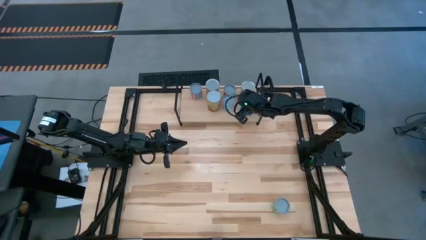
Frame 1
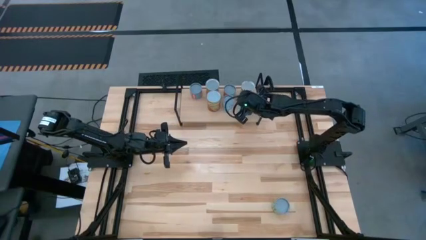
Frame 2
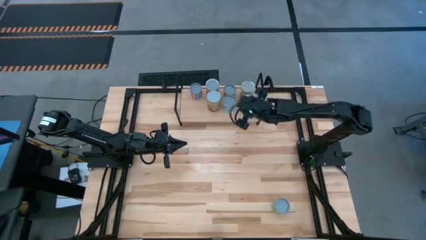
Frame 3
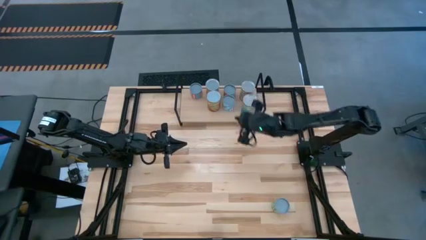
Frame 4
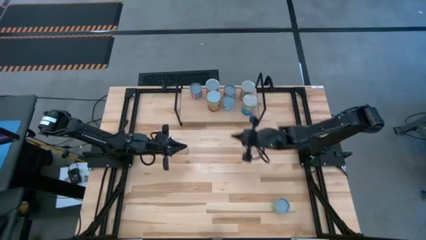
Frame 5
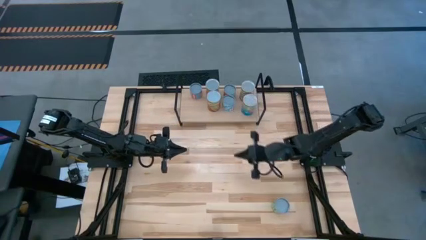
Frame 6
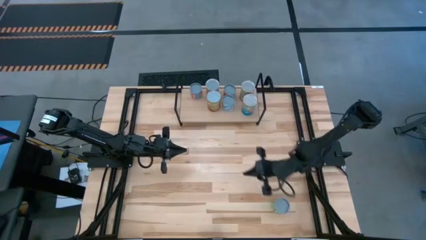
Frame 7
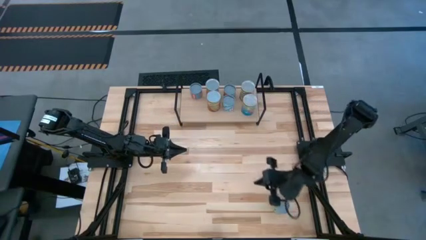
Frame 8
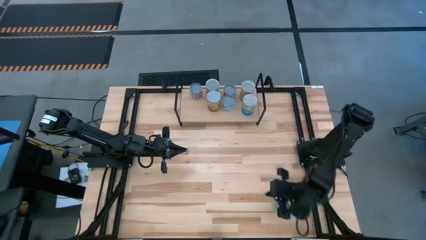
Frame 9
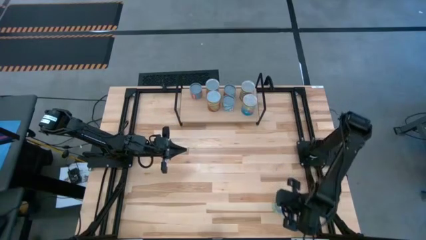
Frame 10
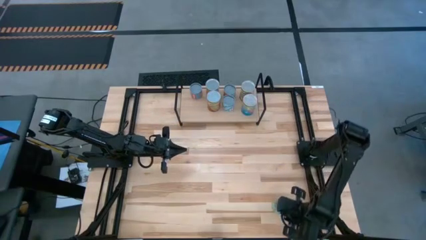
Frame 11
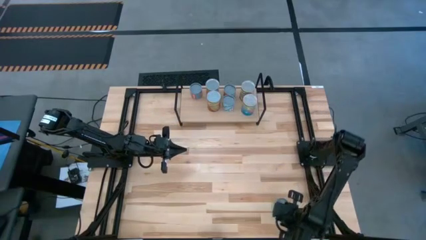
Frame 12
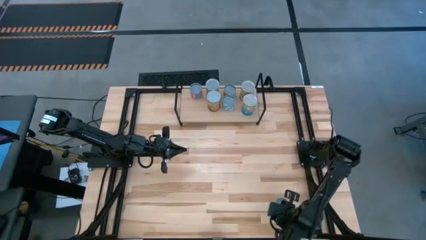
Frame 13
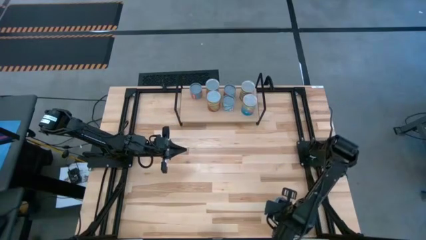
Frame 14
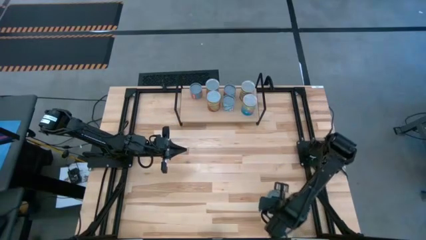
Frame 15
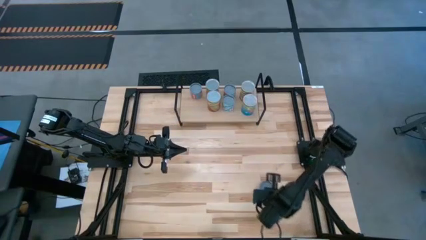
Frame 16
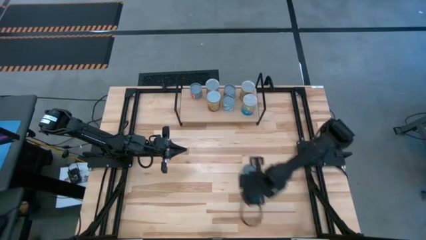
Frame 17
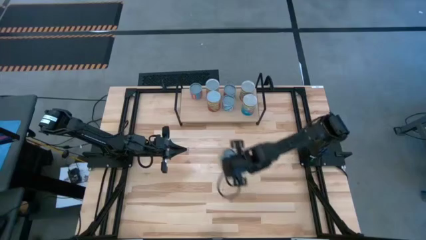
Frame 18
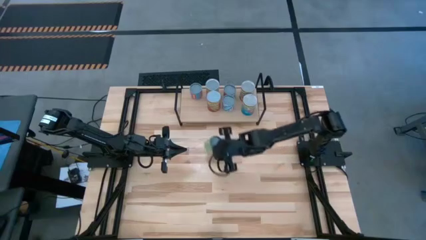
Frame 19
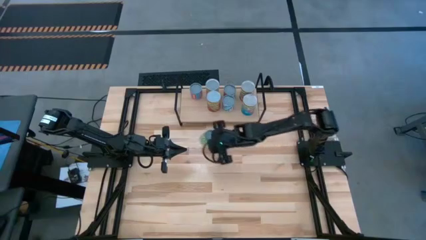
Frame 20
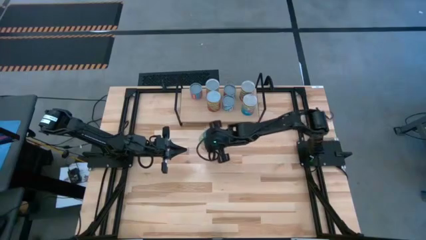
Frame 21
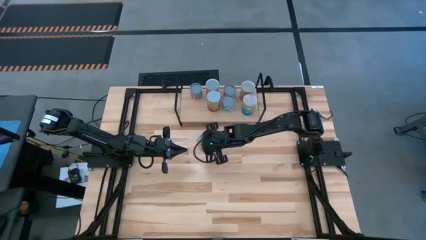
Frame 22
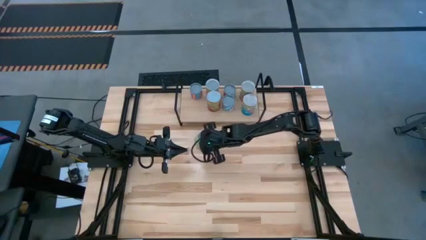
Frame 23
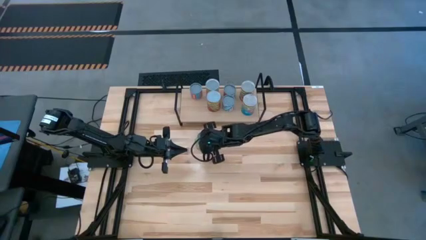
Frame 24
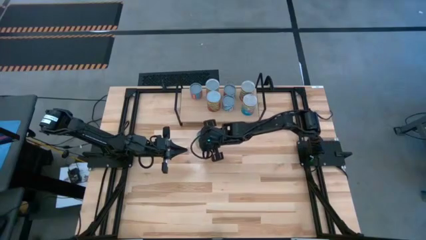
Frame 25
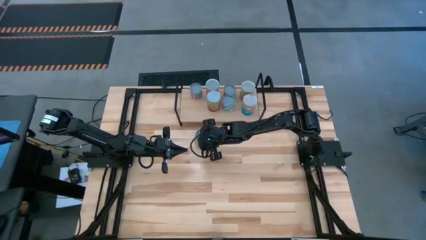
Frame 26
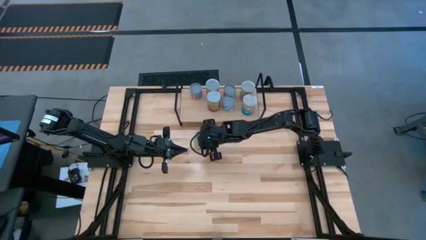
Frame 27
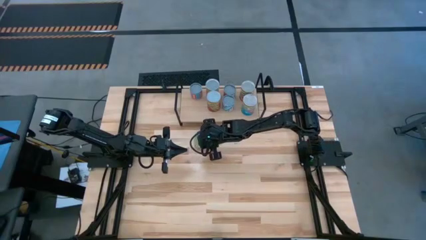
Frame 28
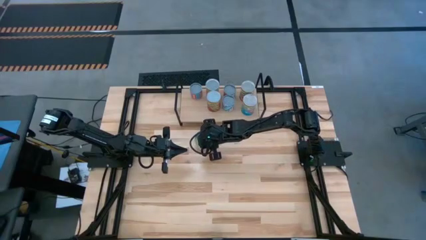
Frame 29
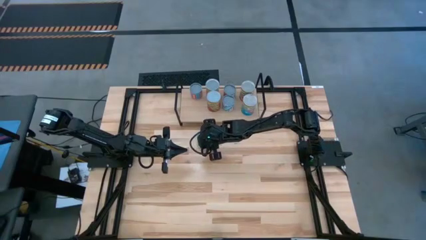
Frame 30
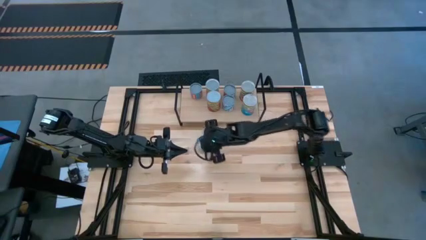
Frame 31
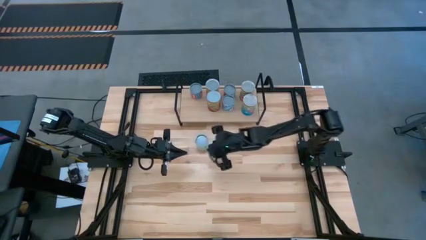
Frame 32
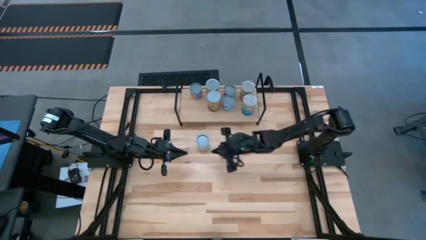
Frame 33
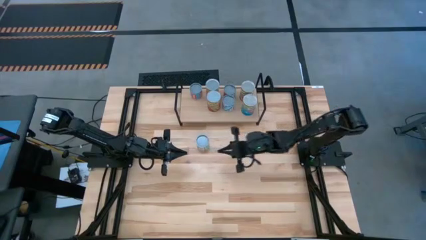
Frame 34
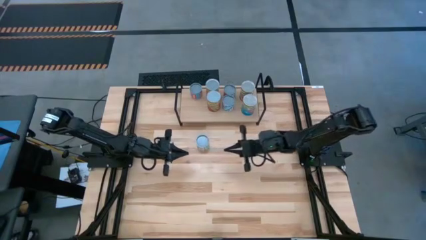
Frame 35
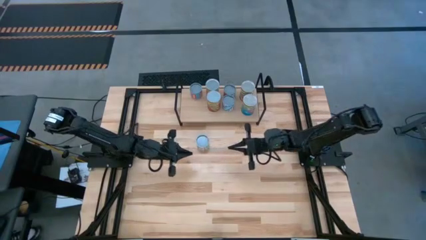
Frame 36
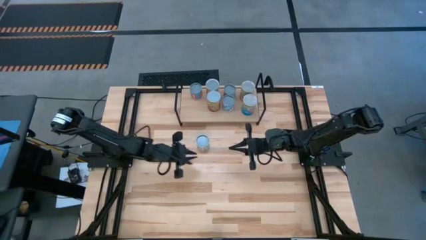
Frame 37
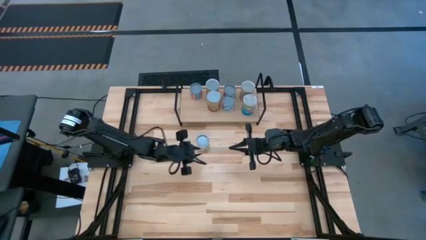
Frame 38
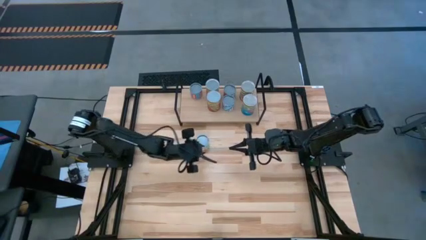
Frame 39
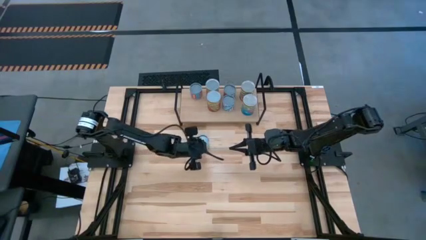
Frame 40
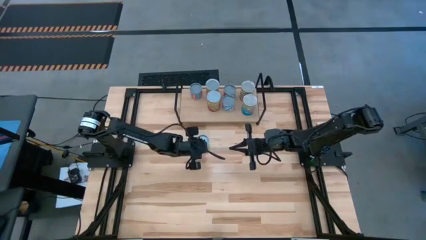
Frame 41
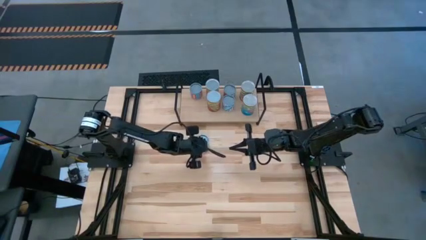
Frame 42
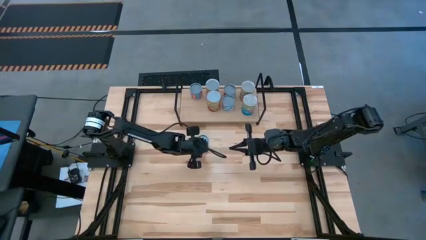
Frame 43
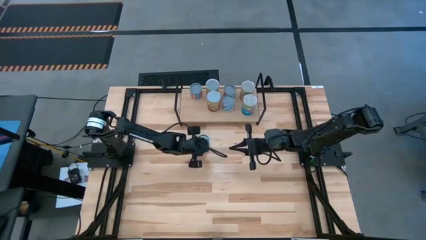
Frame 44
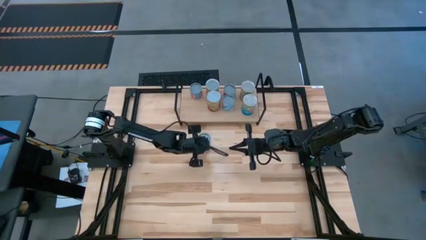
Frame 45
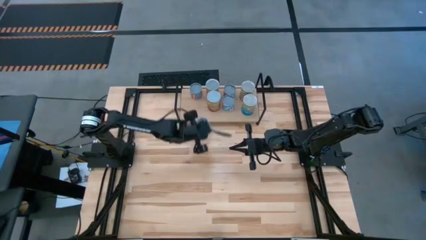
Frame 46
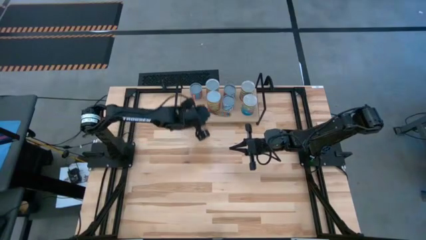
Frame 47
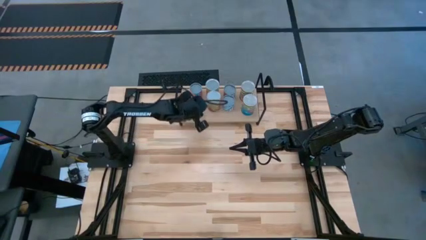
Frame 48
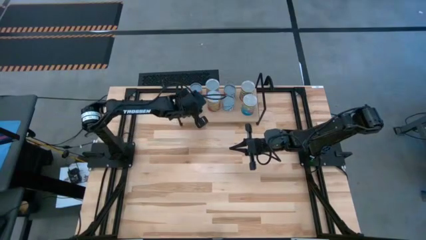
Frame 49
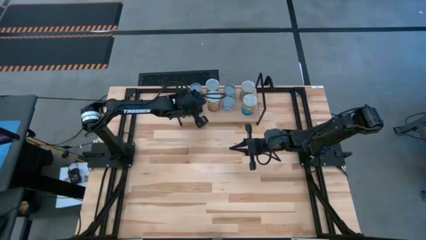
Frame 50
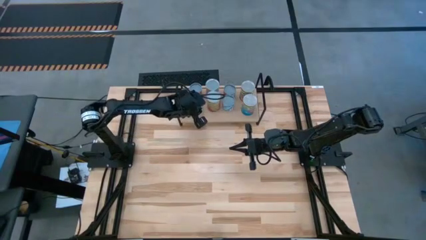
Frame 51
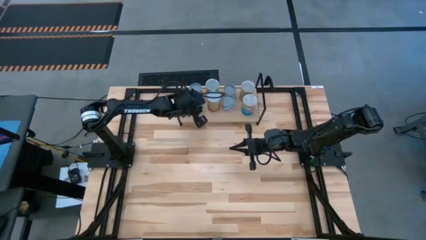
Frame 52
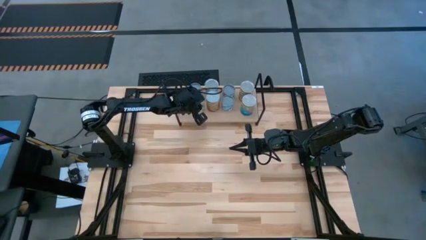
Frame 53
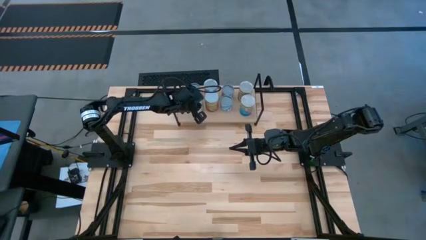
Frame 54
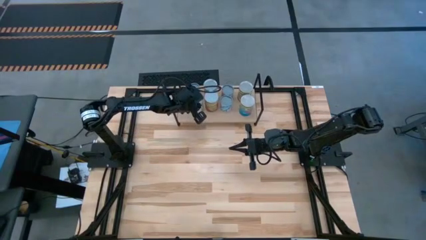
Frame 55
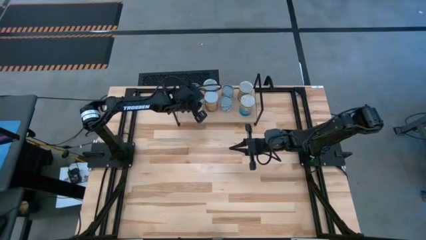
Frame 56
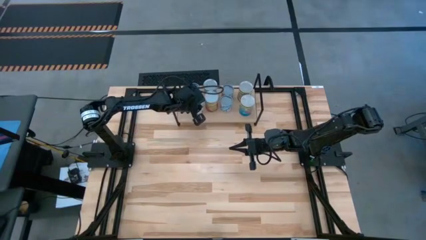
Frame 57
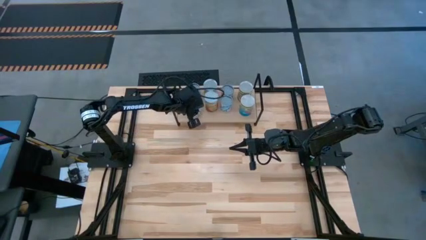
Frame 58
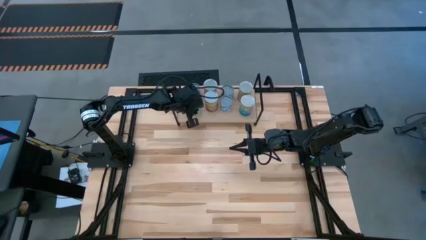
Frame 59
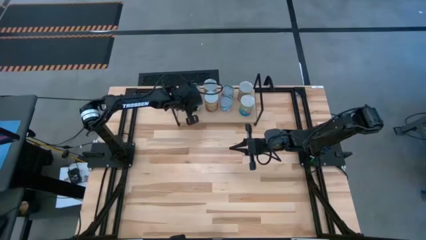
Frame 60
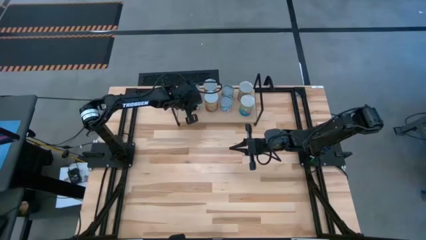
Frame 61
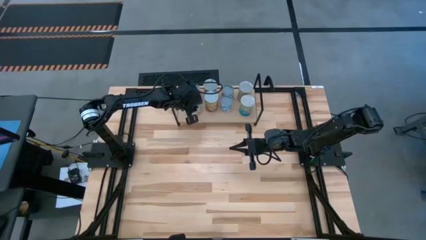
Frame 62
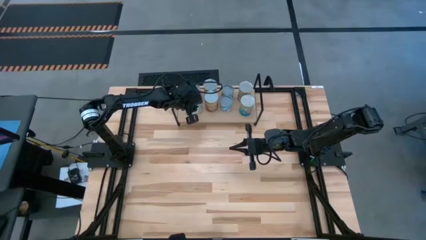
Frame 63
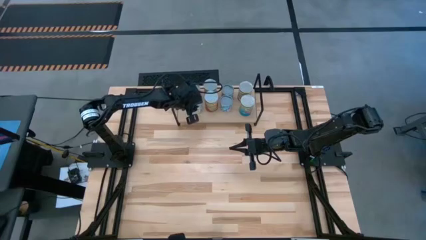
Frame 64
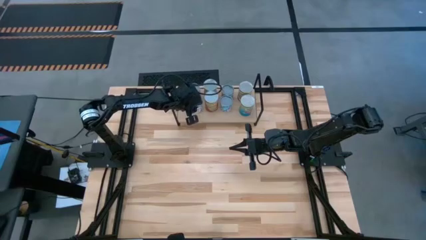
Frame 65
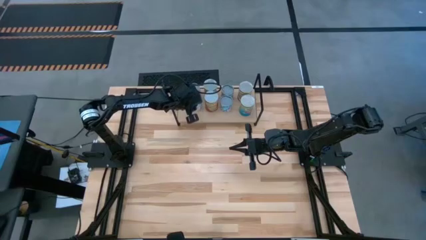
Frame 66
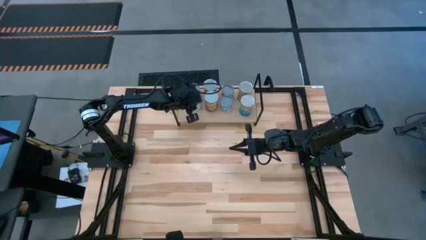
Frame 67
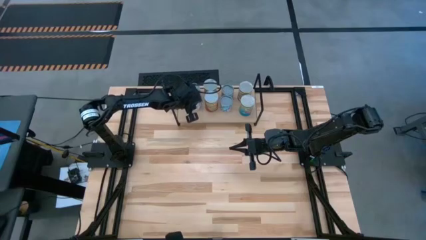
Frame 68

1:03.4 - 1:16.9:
Task: Pick and place cans onto a shelf
Put the light green can on the shelf aligned with the blue can
